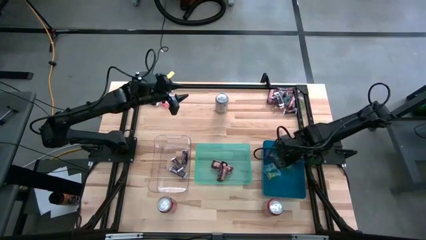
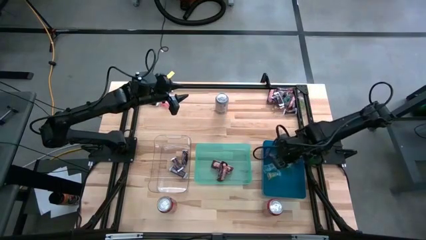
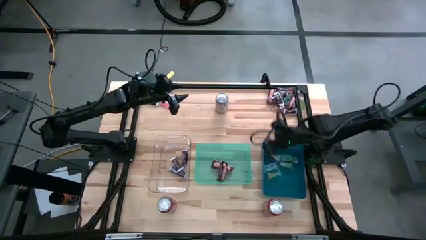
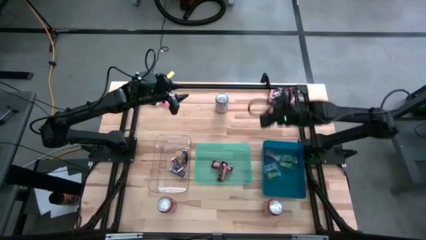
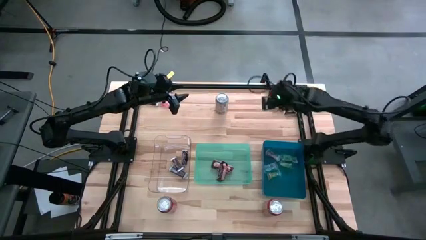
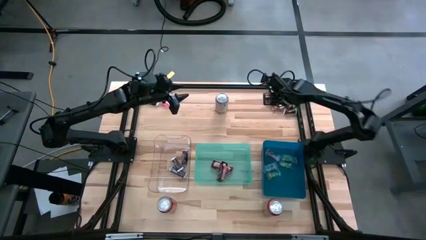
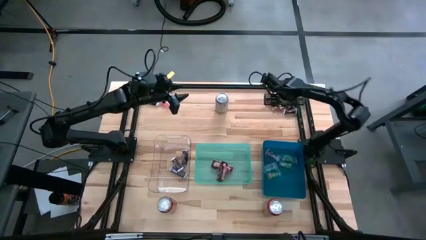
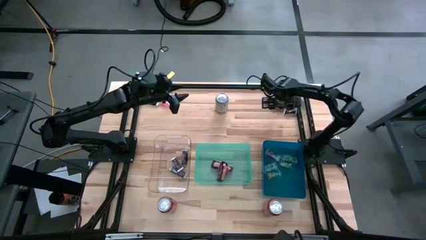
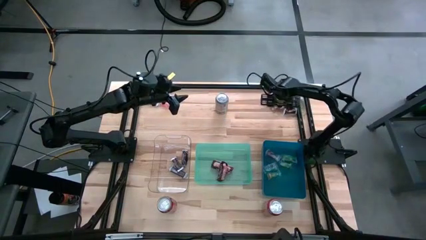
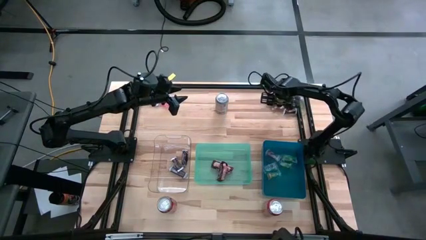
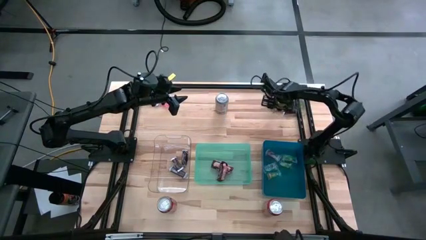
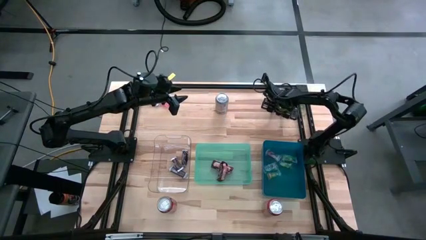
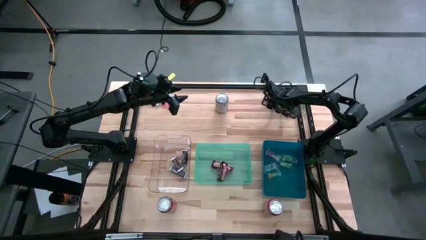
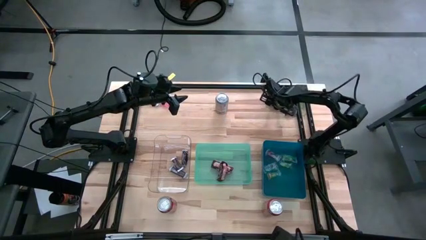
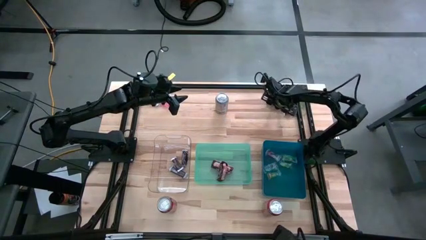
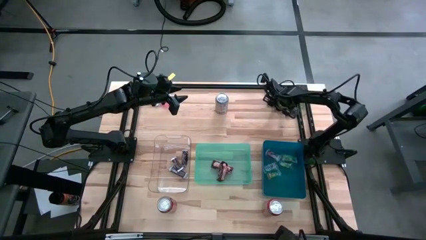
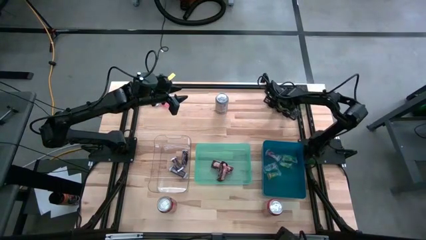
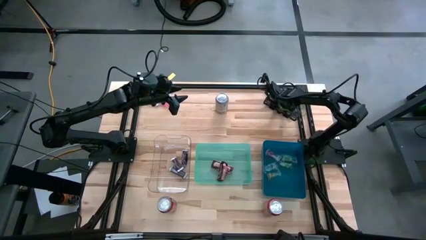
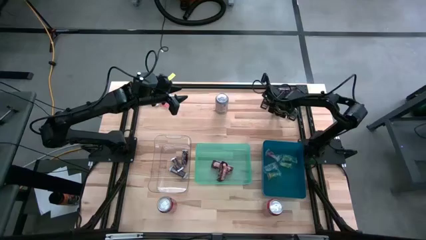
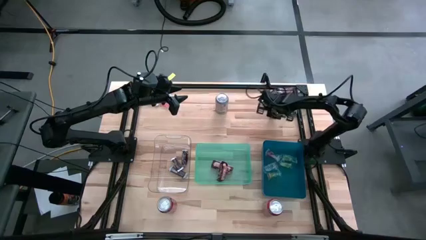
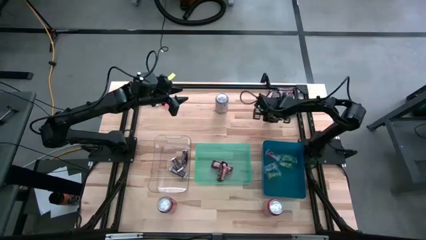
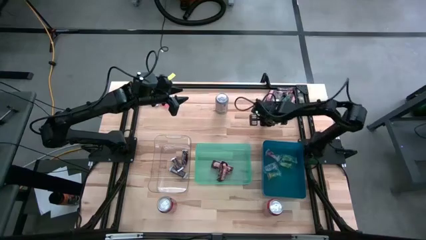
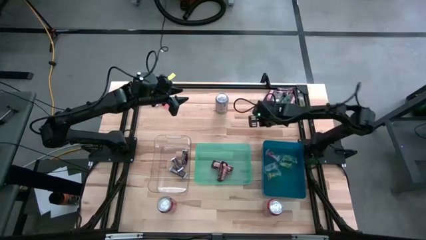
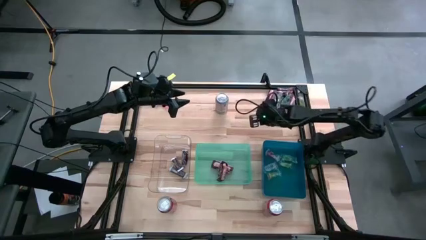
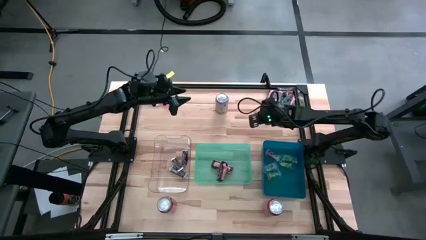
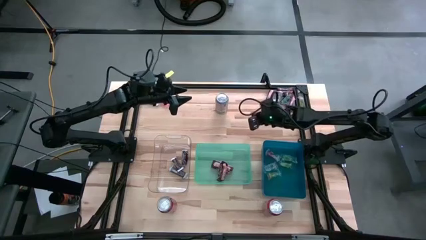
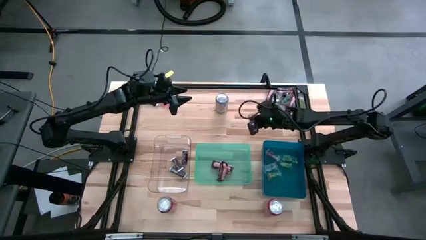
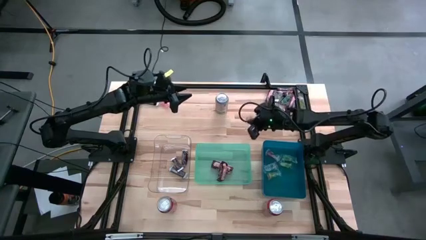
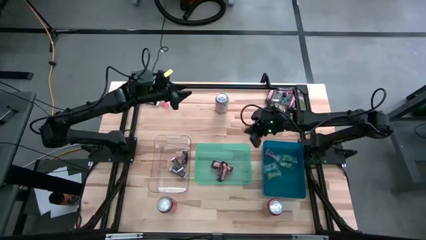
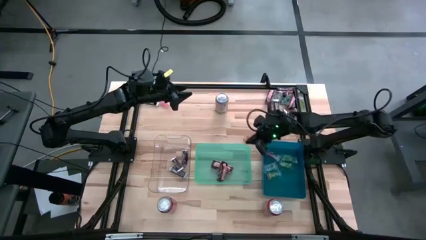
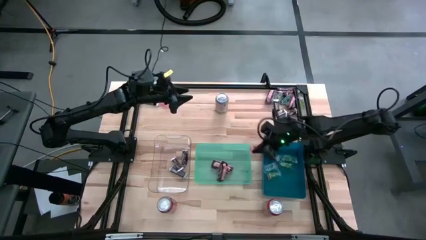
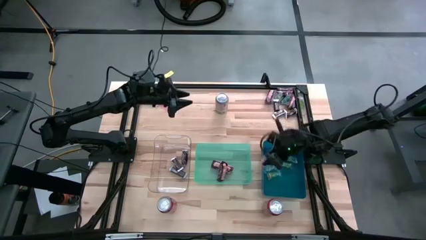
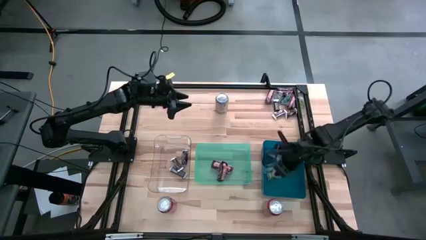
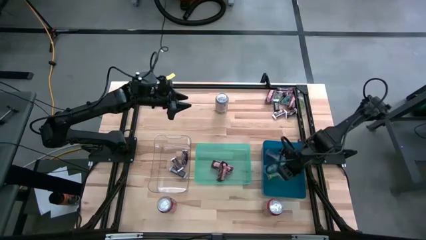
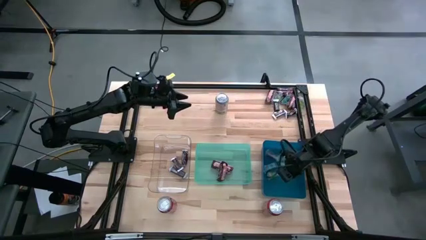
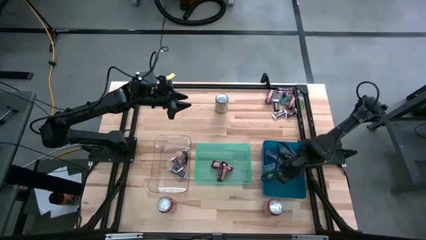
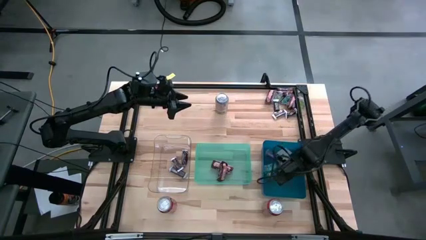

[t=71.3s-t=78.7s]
Task: Organize candy in baskets
Put the orange gummy into the blue bin

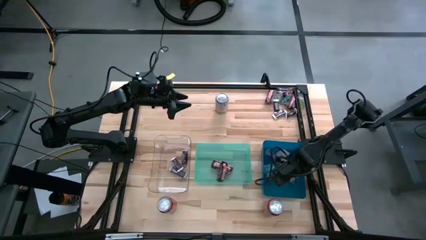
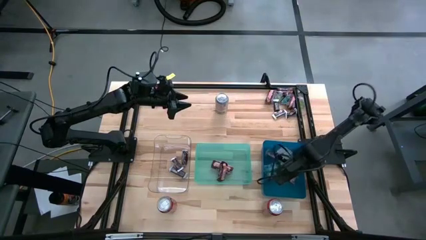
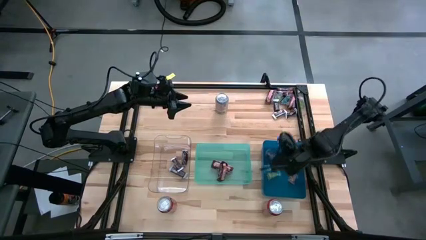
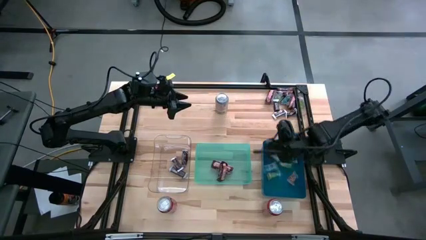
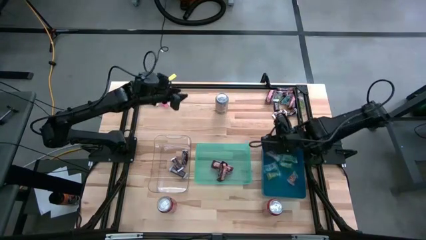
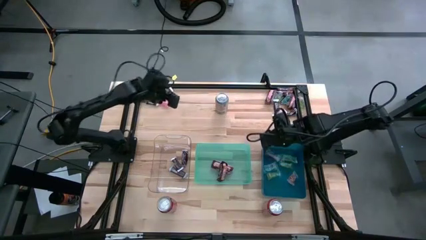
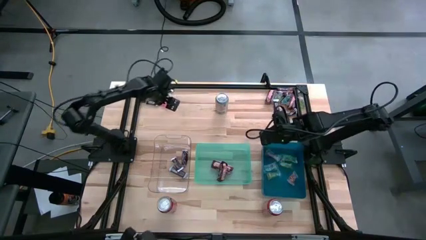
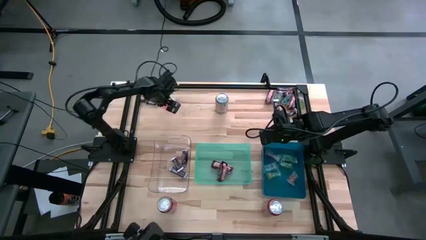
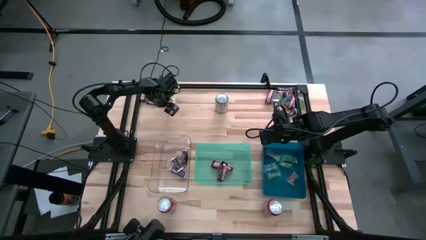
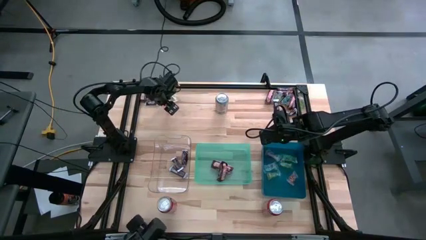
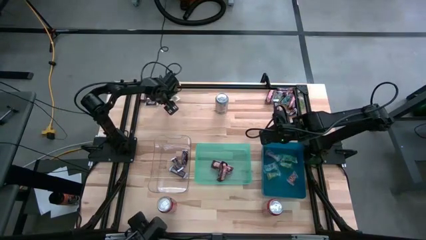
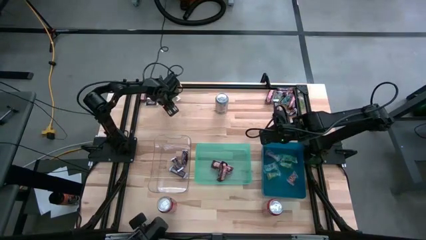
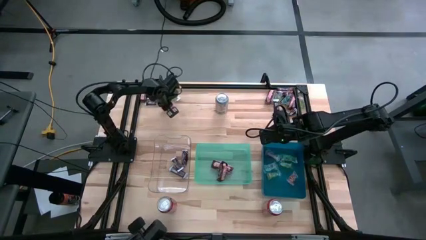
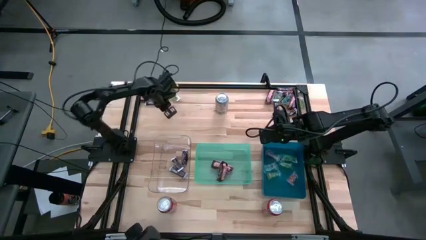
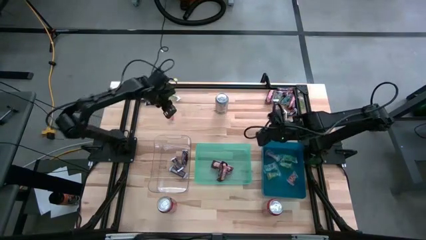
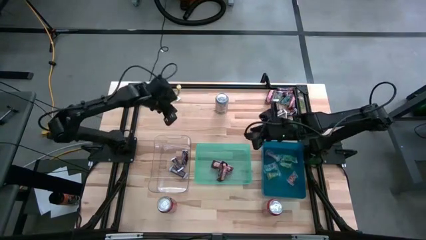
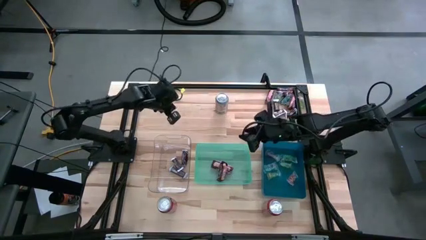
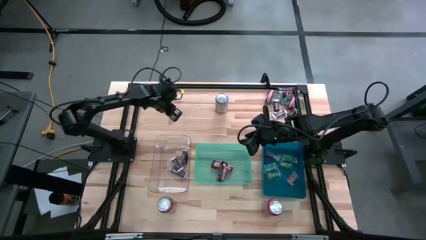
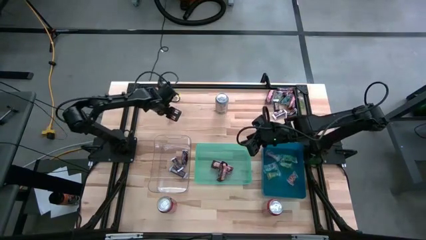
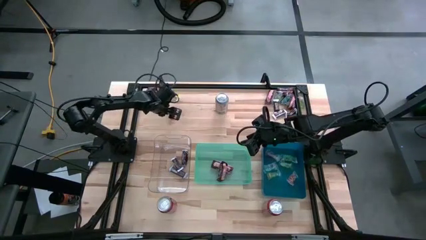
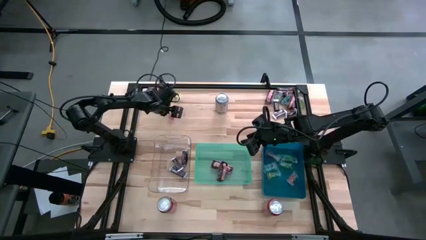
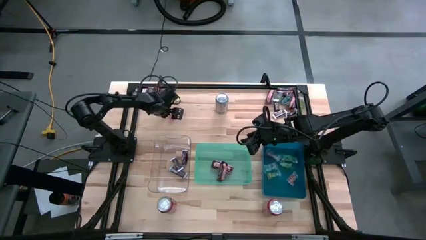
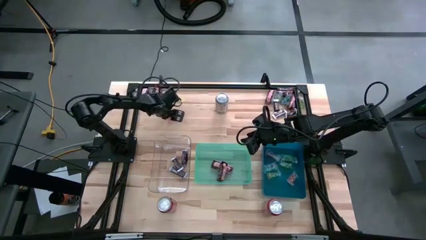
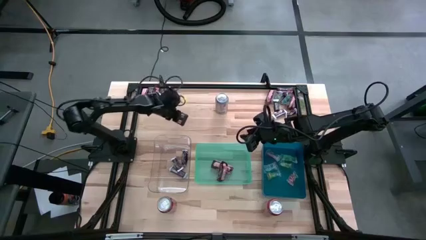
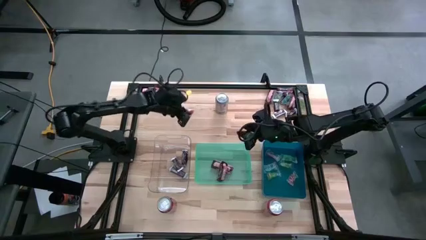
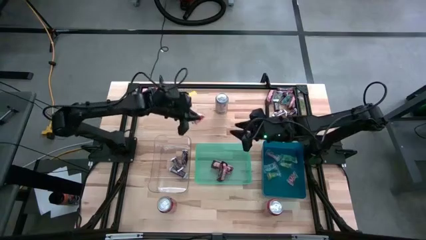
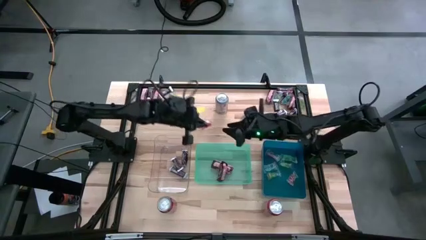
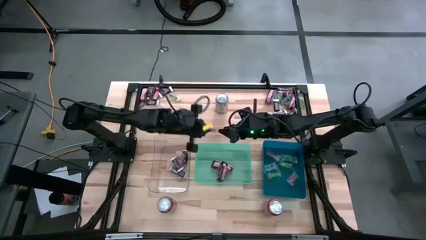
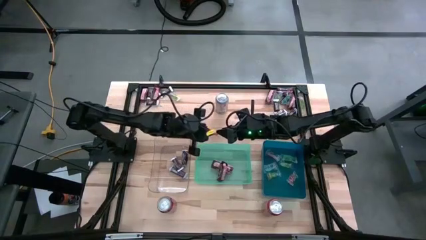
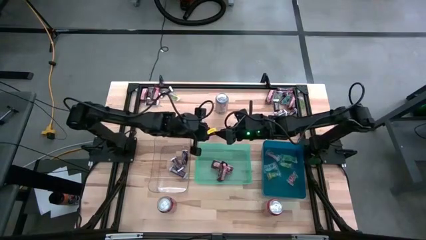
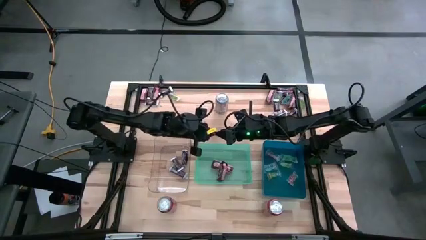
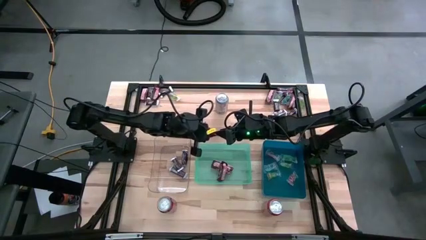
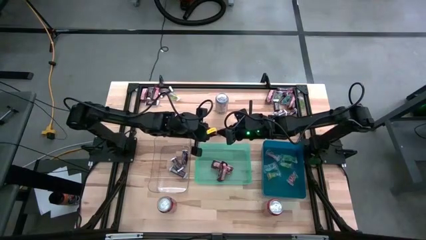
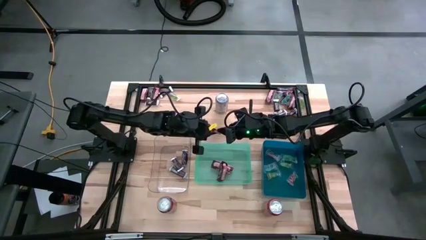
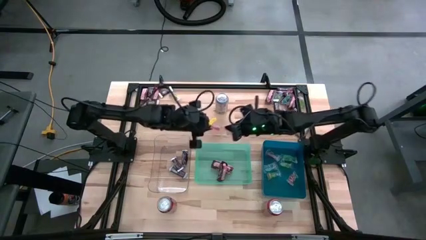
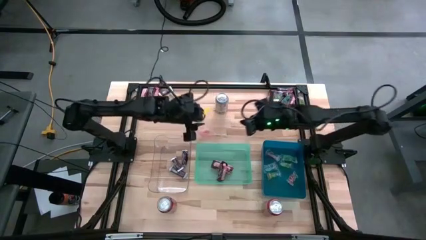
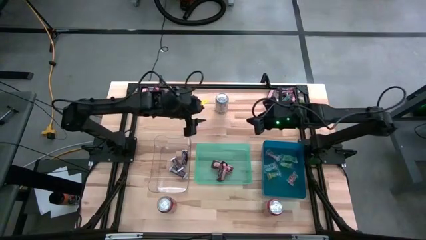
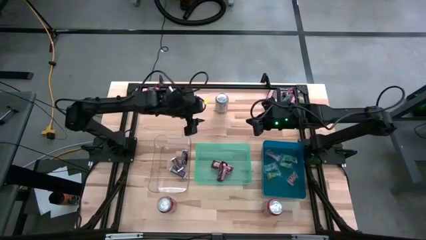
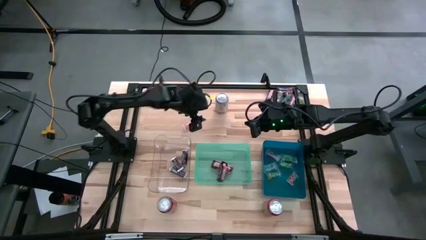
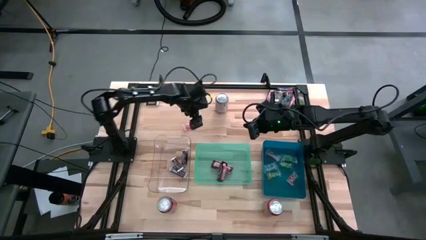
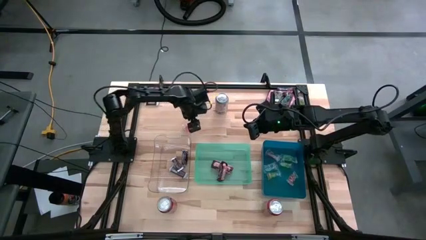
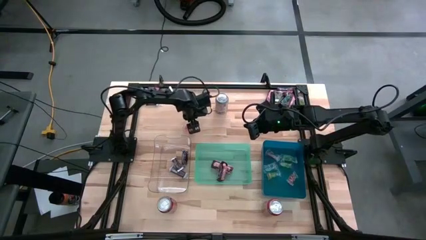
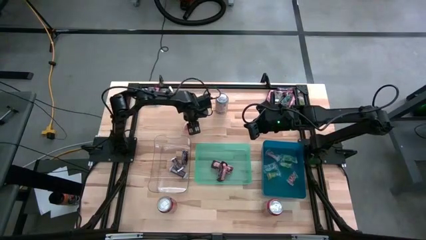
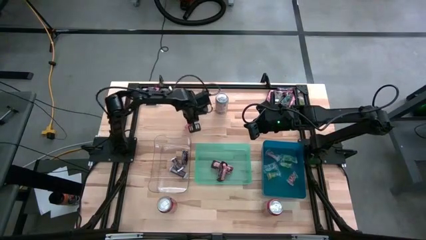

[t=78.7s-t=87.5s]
Put the red gummy into the blue bin
